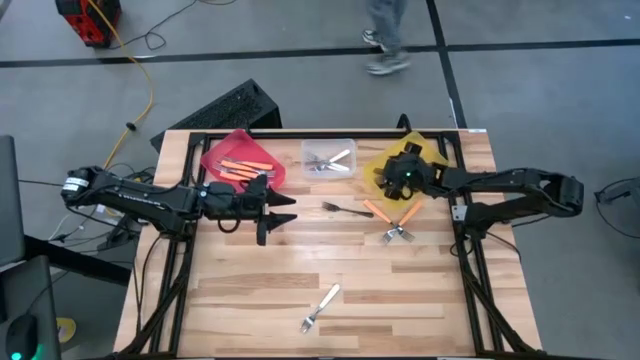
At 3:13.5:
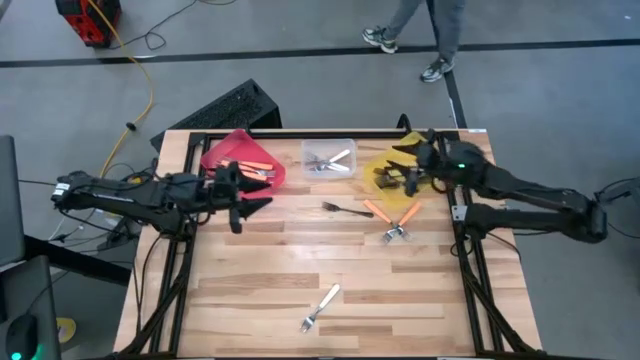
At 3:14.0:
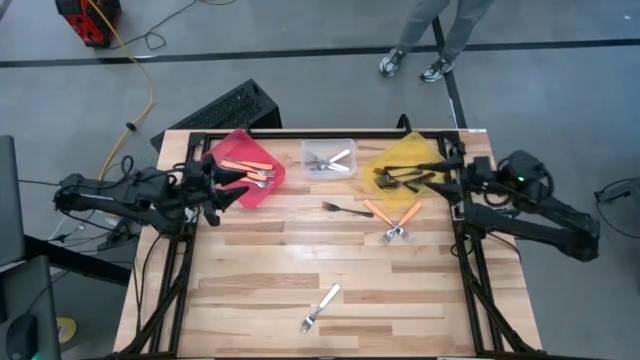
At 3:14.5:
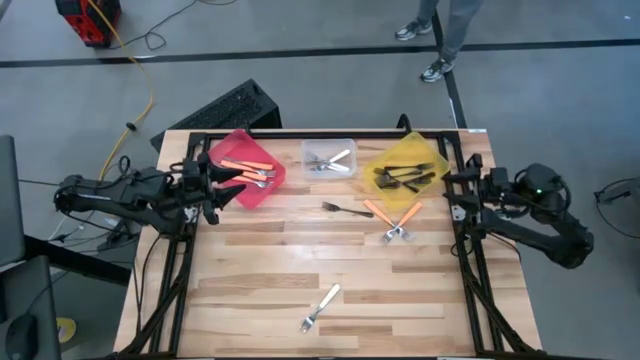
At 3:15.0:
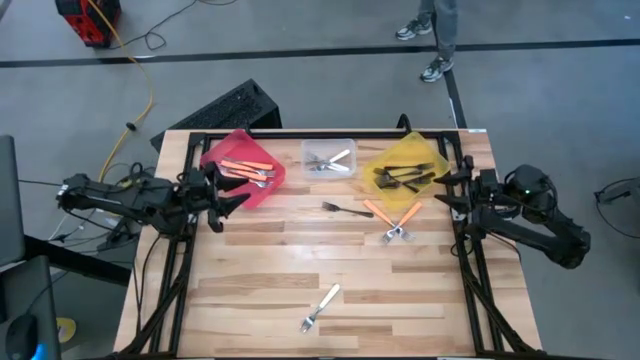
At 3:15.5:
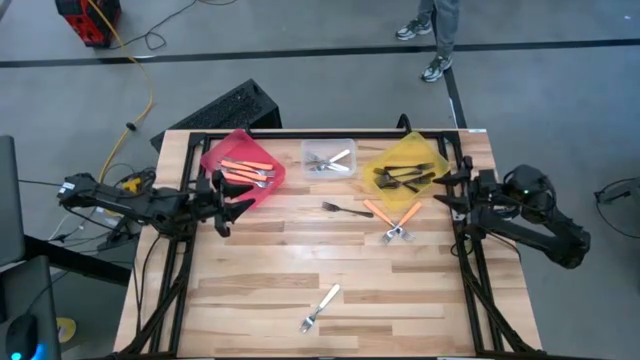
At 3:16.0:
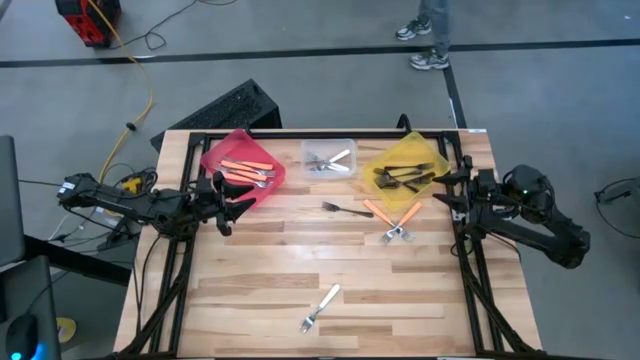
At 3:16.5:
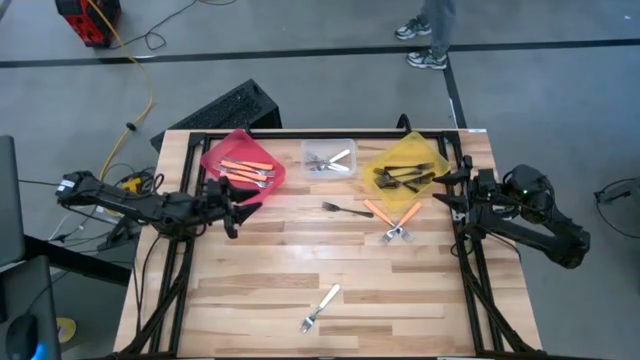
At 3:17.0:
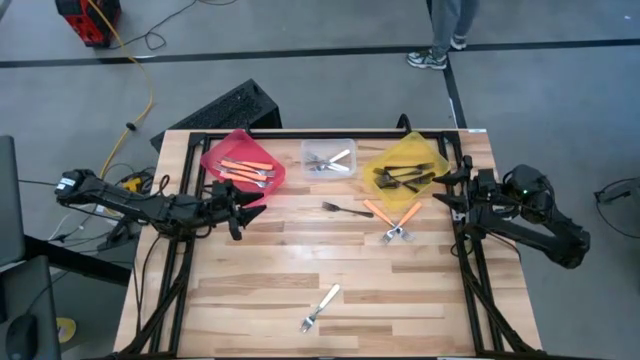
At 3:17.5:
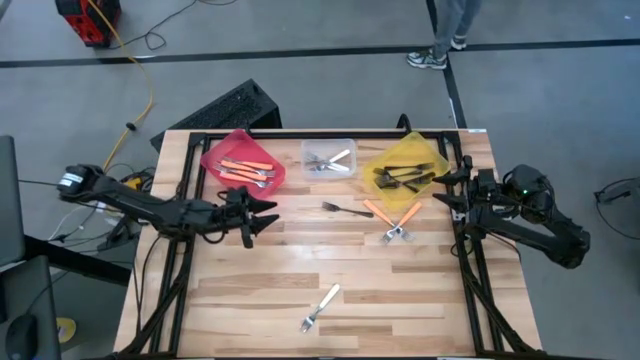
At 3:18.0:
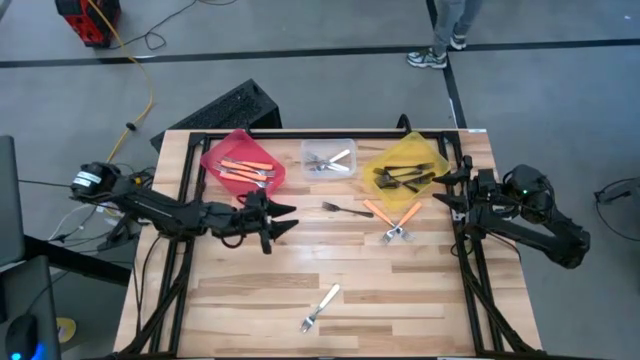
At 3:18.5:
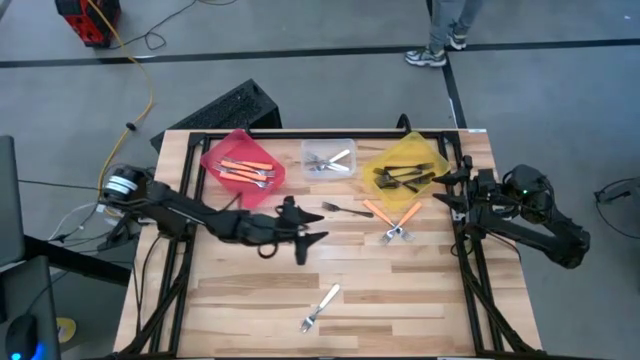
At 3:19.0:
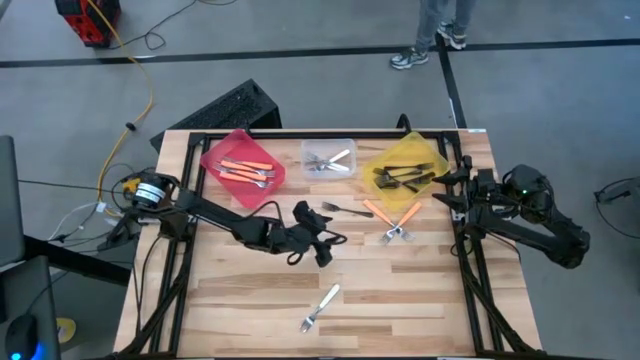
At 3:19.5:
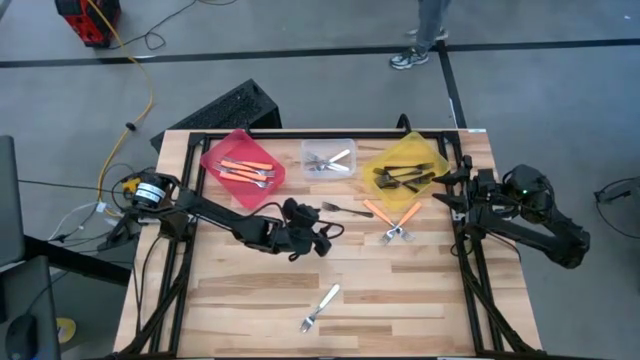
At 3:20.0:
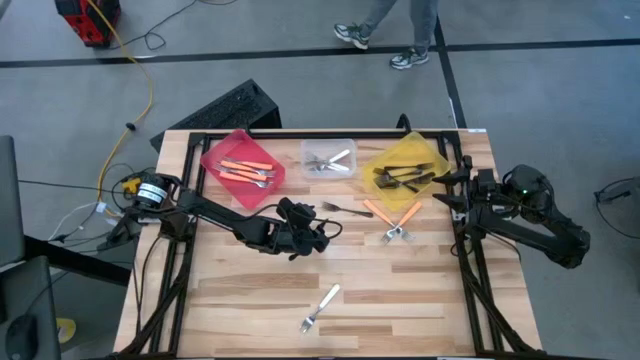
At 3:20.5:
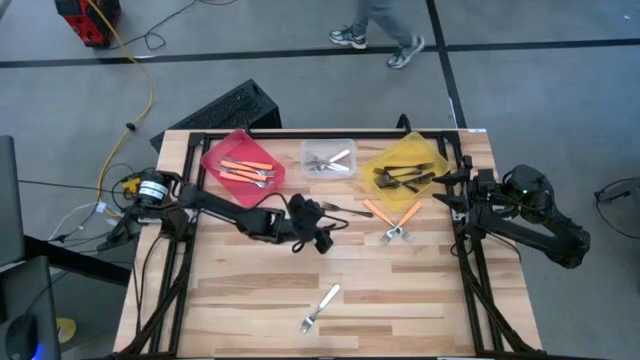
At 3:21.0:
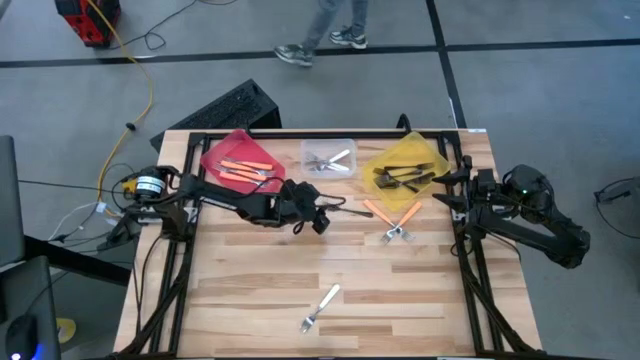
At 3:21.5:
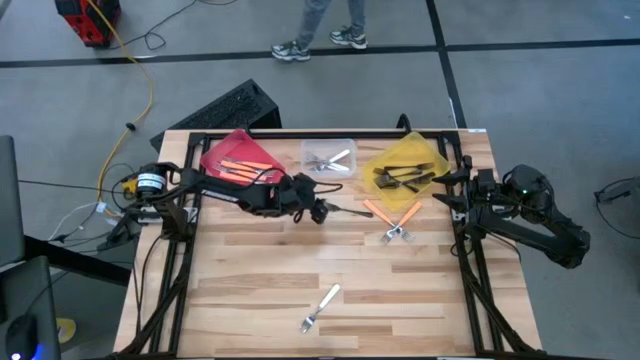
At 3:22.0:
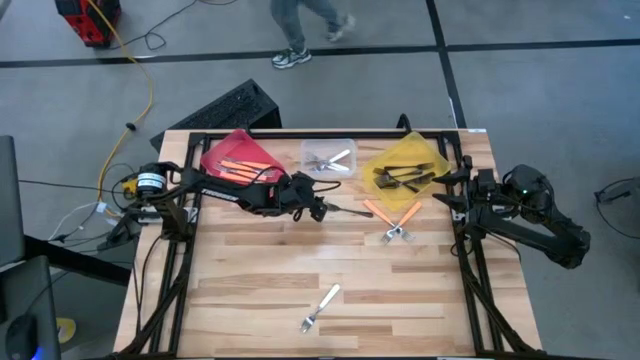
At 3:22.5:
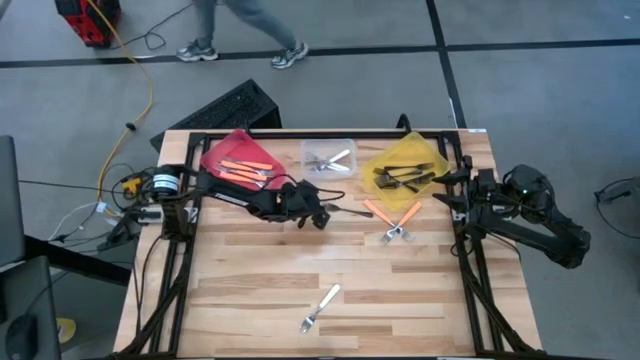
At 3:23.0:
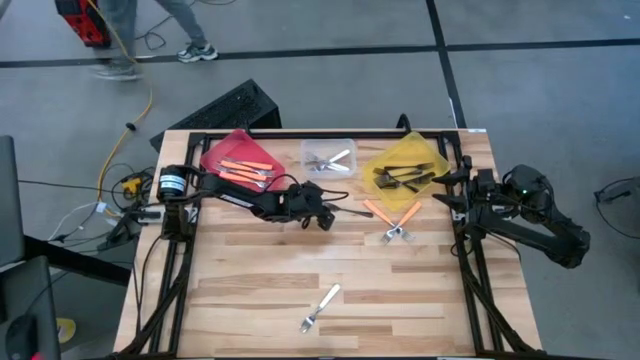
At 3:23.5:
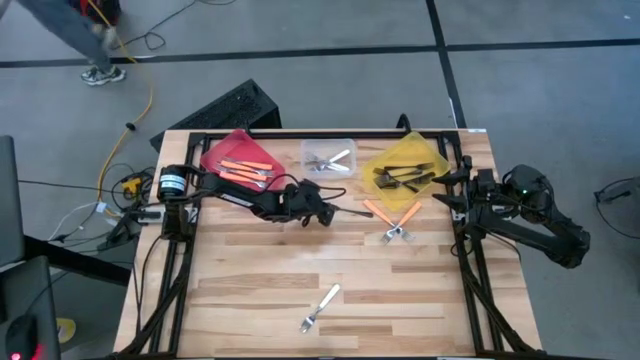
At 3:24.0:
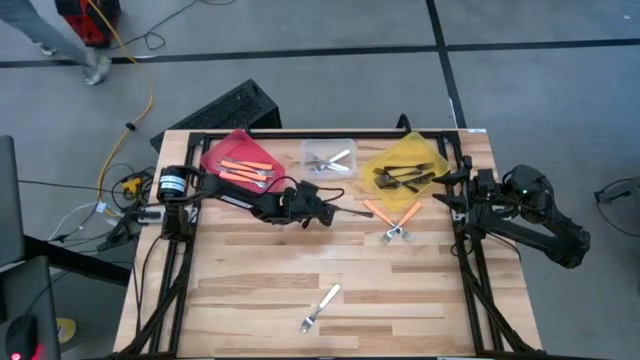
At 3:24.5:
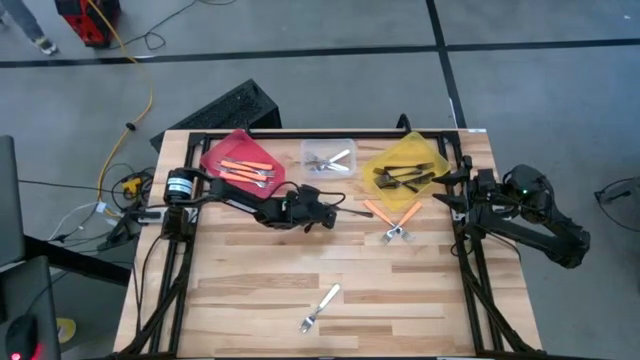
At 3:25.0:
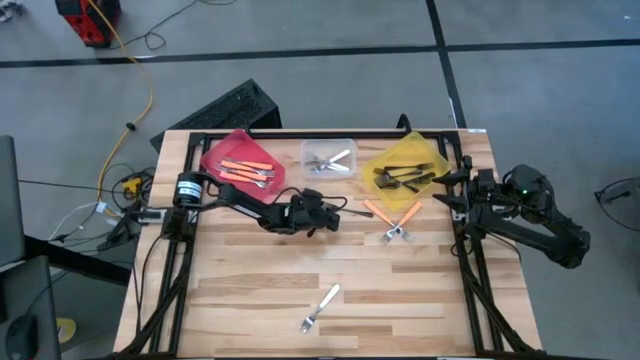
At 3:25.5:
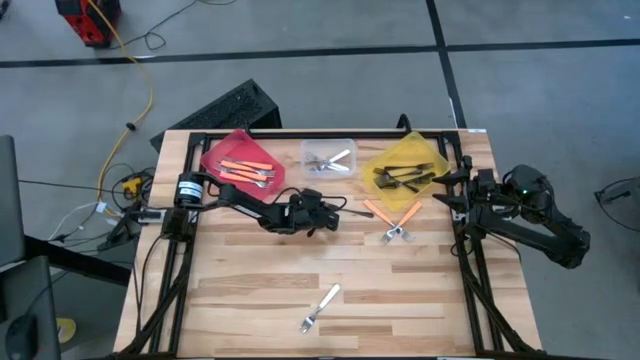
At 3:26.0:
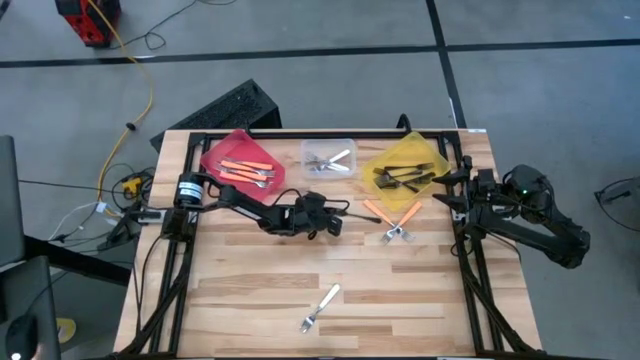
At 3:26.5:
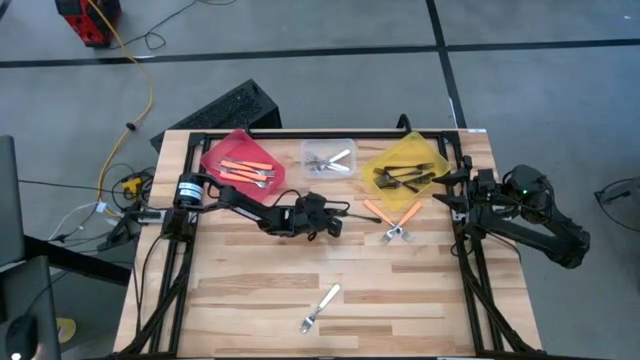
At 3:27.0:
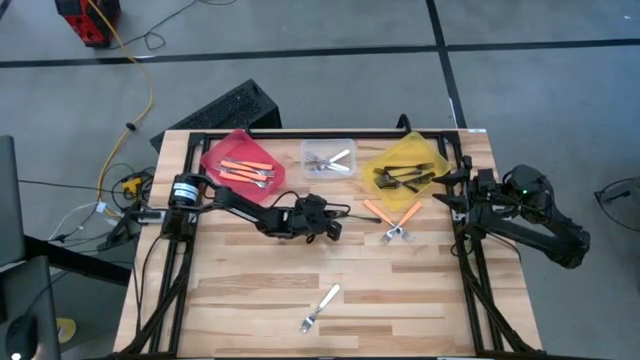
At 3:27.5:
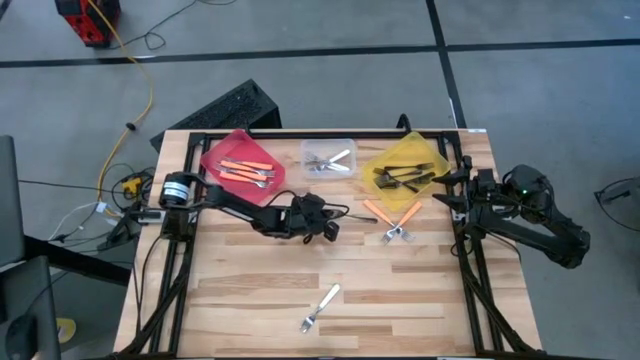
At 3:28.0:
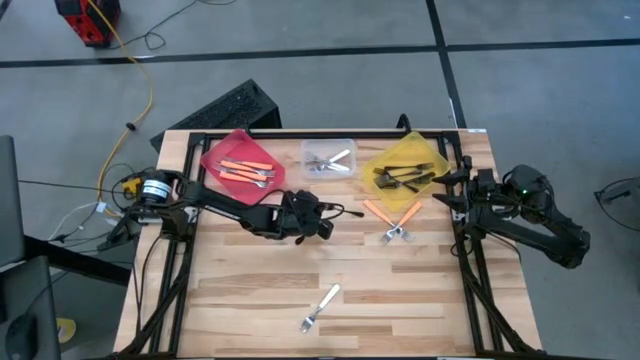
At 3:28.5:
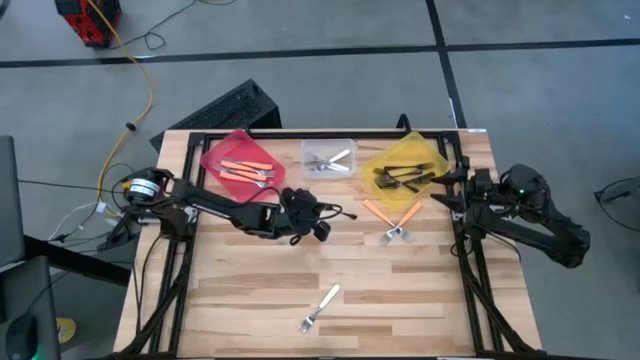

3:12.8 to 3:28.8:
Task: Sort silverware by color (type)
Put the black fork into the yellow bin

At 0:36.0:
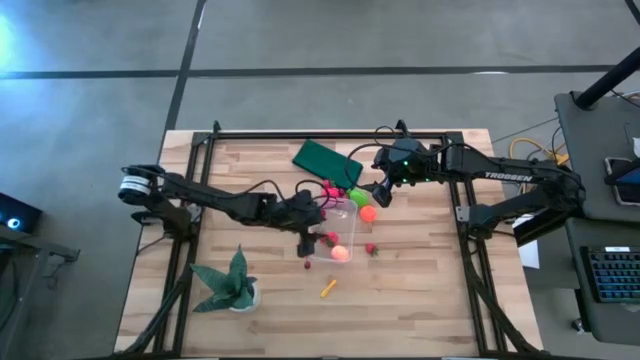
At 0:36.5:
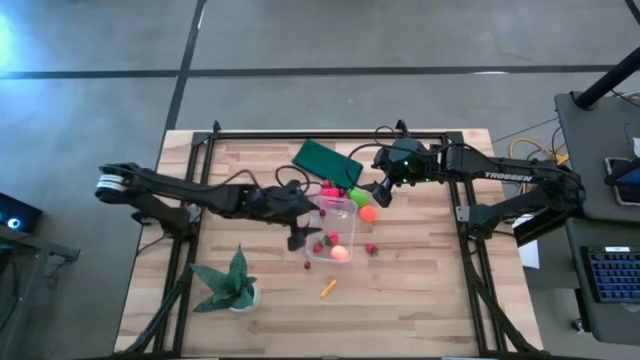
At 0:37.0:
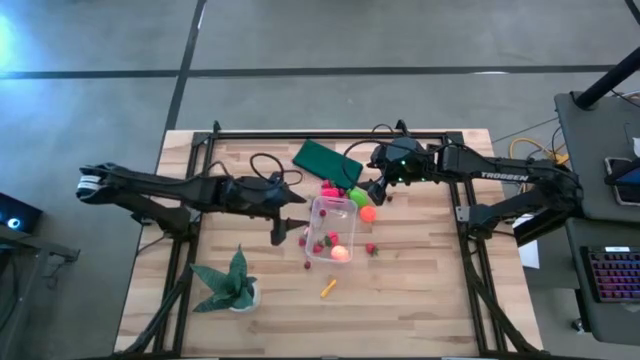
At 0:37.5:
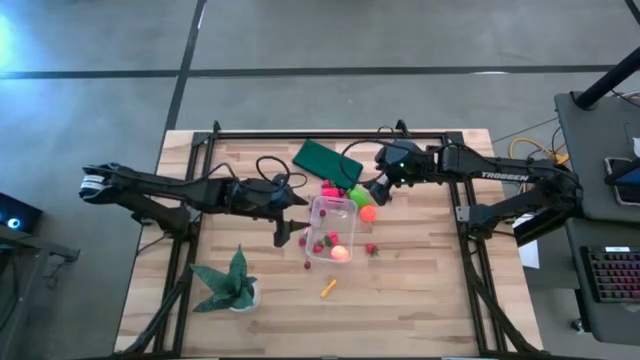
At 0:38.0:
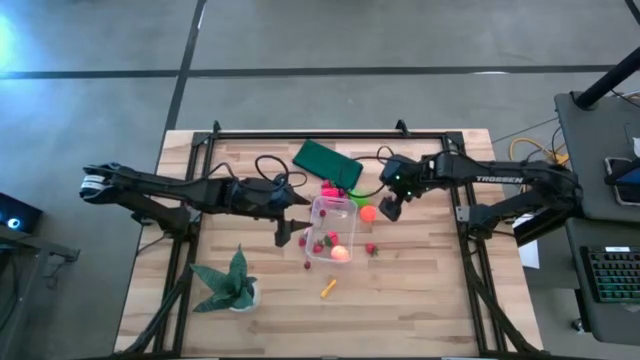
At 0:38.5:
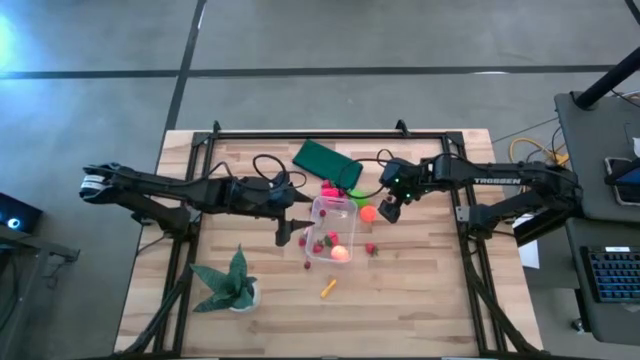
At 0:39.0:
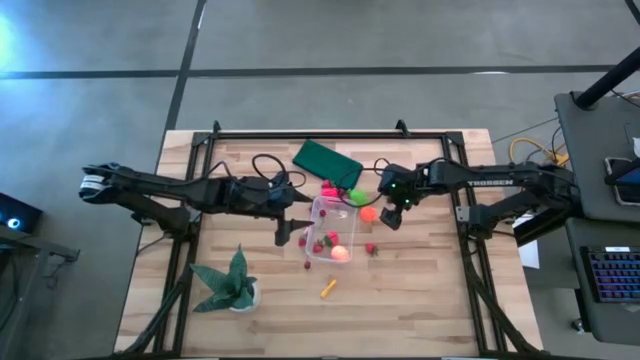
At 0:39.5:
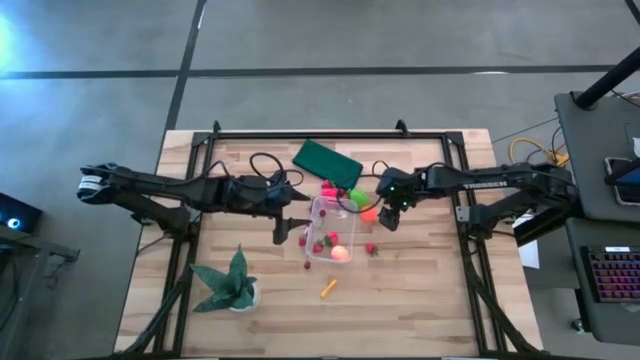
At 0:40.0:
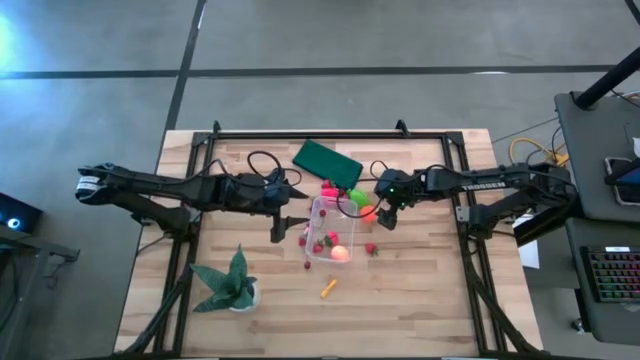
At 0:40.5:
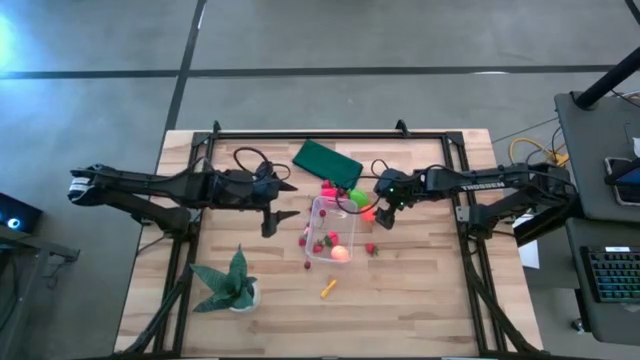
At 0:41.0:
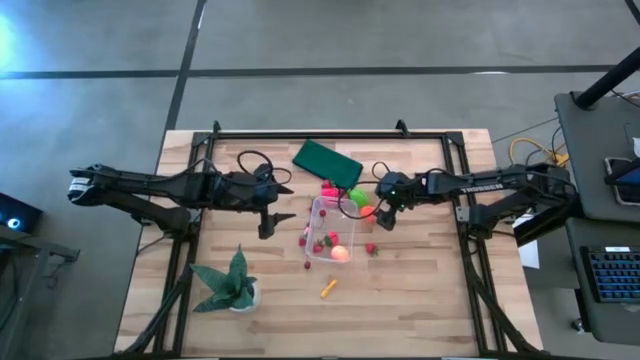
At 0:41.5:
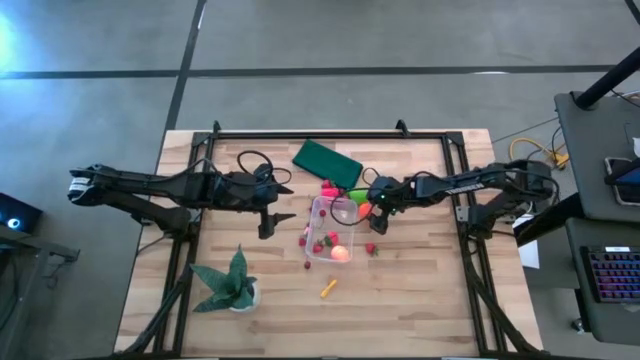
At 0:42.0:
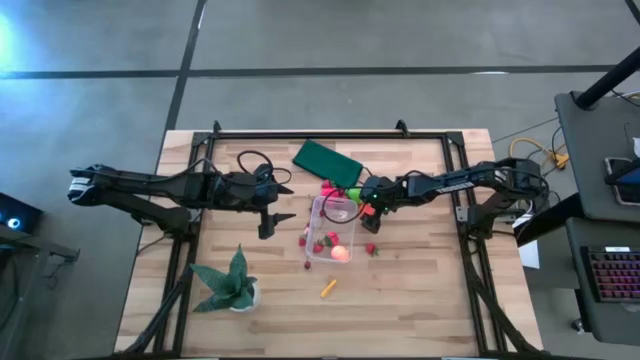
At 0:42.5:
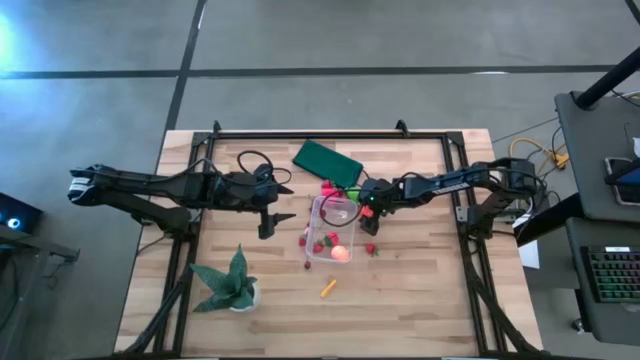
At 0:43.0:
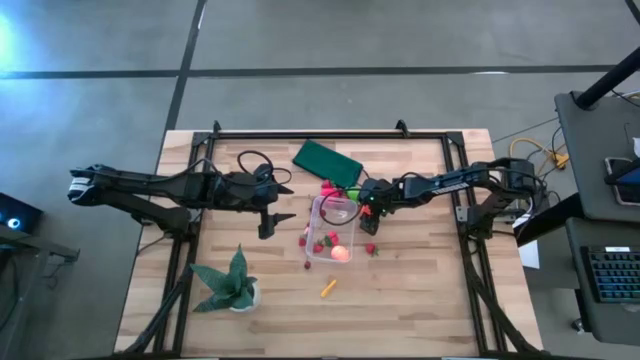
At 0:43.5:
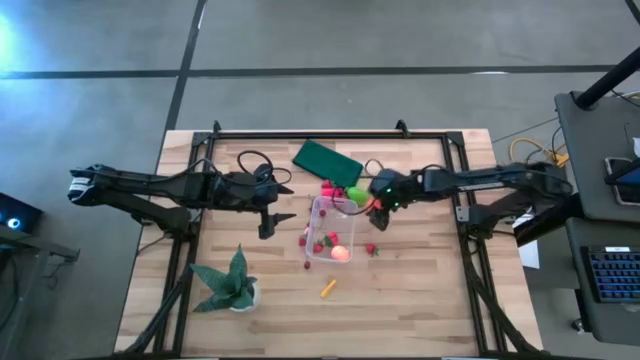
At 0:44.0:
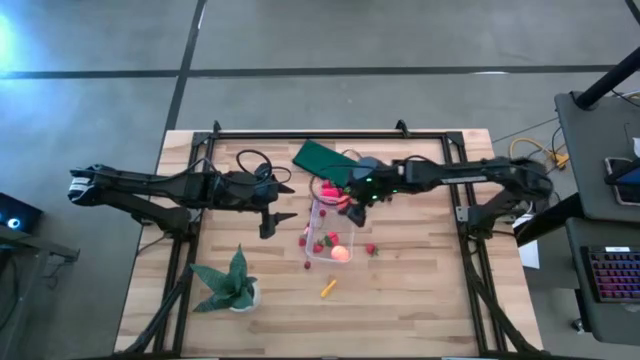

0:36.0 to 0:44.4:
Task: Pick and placing Produce into tupperware
Put the pumpkin into the transparent bin
